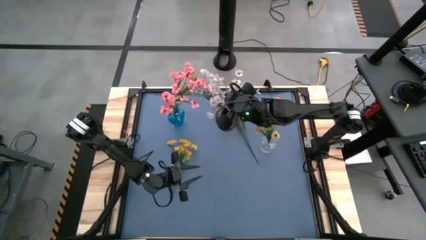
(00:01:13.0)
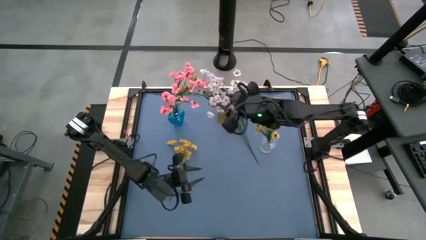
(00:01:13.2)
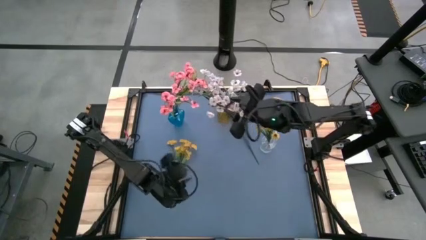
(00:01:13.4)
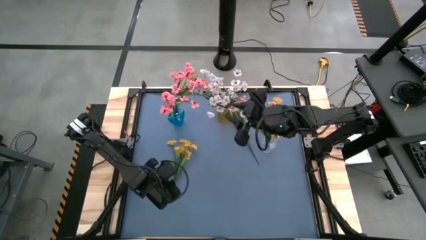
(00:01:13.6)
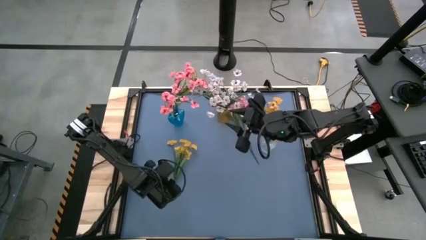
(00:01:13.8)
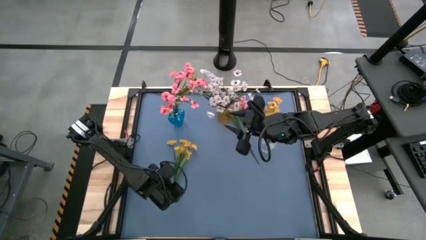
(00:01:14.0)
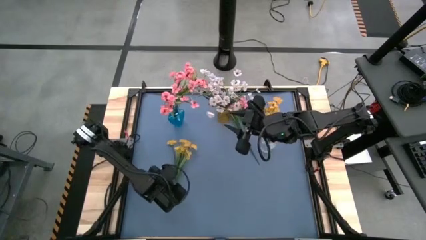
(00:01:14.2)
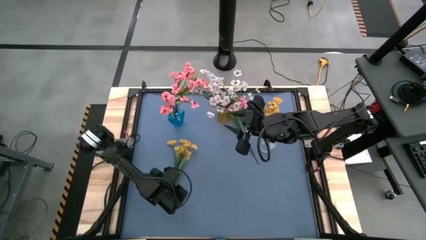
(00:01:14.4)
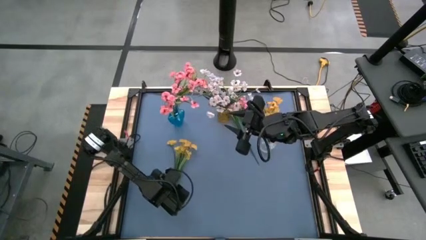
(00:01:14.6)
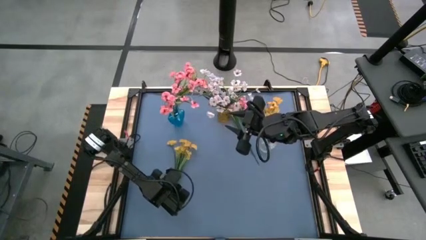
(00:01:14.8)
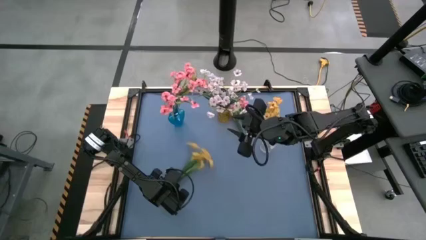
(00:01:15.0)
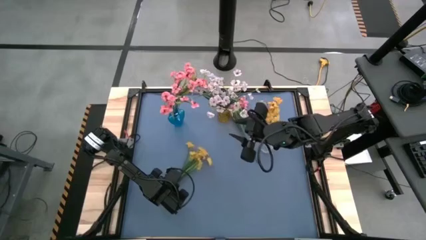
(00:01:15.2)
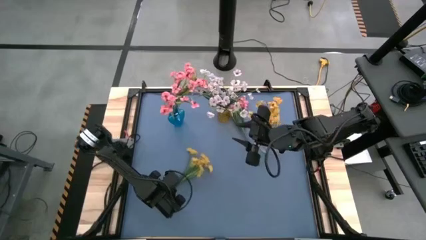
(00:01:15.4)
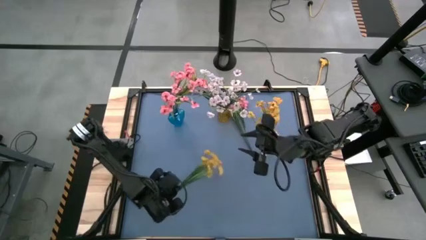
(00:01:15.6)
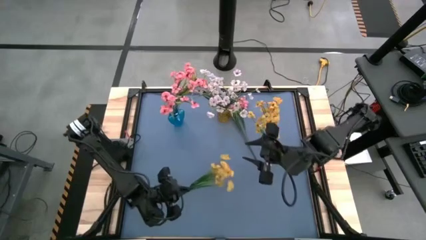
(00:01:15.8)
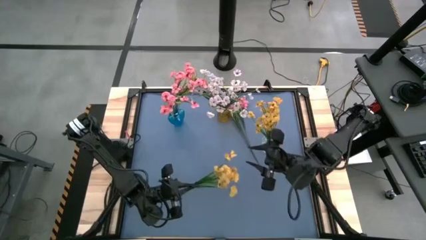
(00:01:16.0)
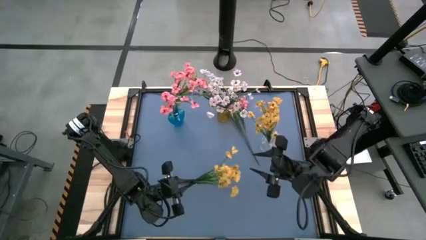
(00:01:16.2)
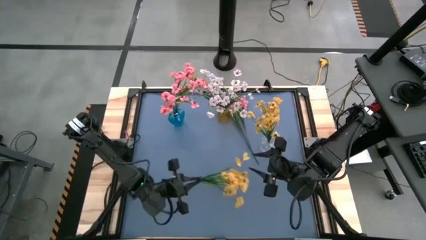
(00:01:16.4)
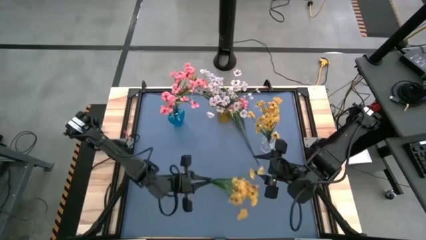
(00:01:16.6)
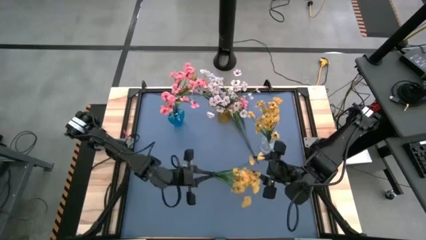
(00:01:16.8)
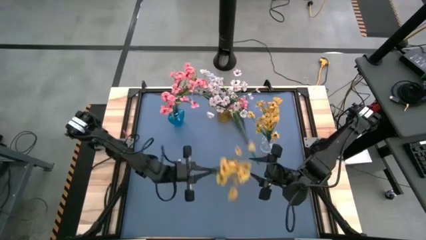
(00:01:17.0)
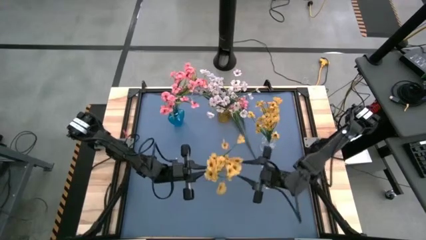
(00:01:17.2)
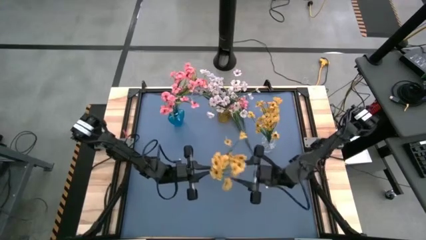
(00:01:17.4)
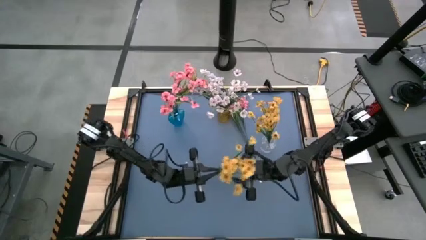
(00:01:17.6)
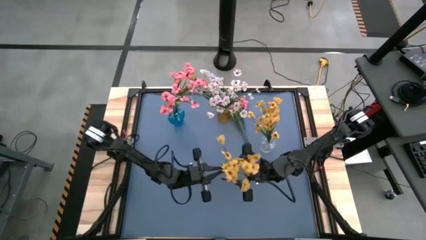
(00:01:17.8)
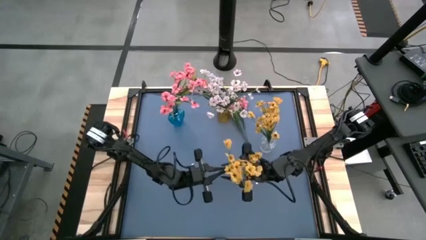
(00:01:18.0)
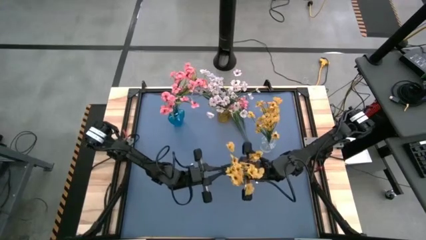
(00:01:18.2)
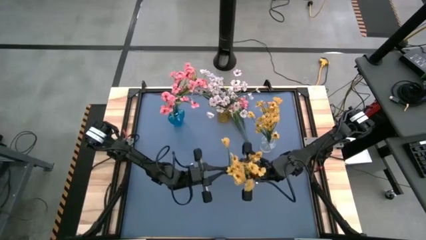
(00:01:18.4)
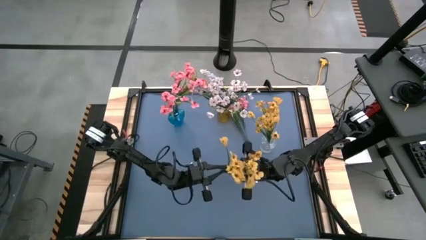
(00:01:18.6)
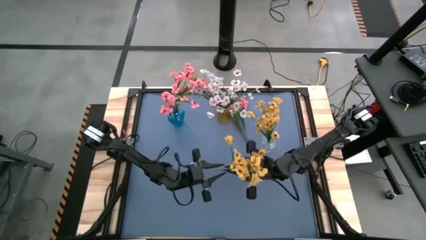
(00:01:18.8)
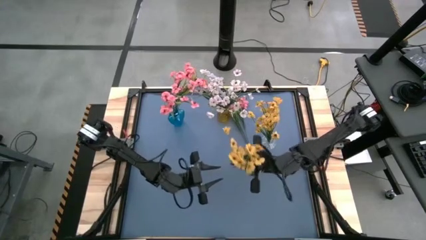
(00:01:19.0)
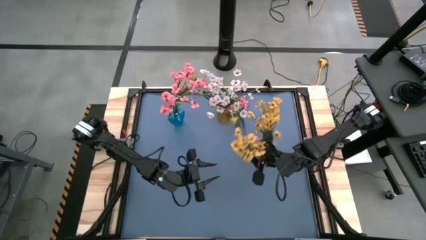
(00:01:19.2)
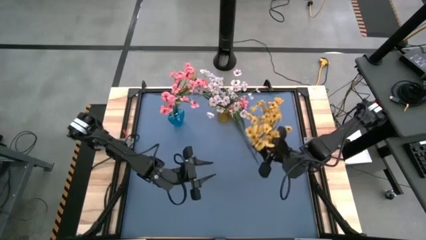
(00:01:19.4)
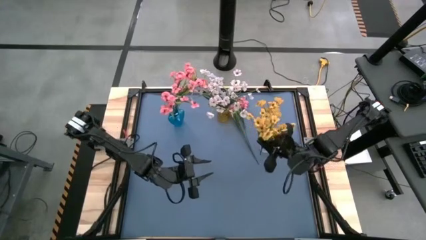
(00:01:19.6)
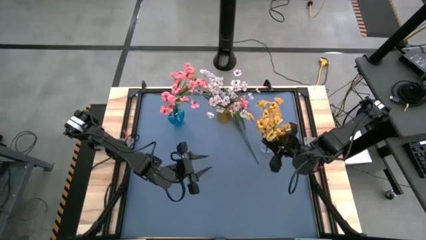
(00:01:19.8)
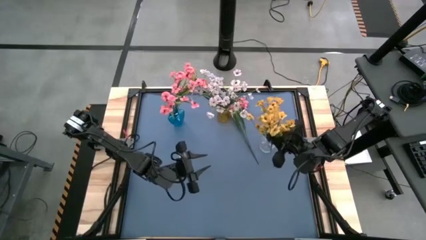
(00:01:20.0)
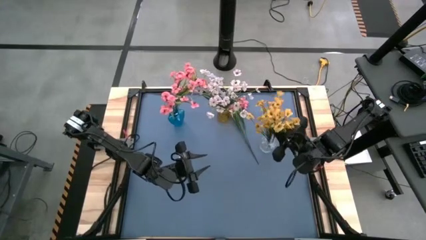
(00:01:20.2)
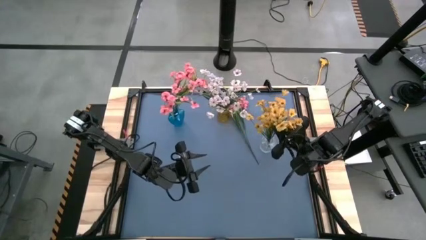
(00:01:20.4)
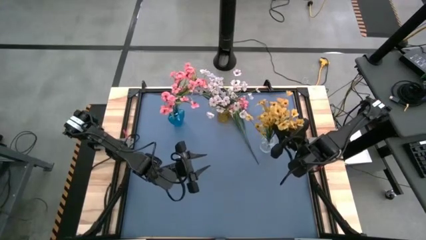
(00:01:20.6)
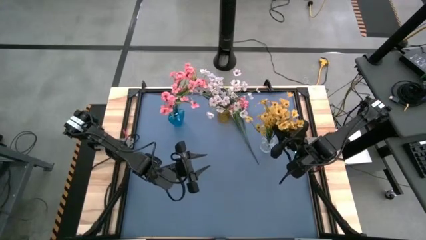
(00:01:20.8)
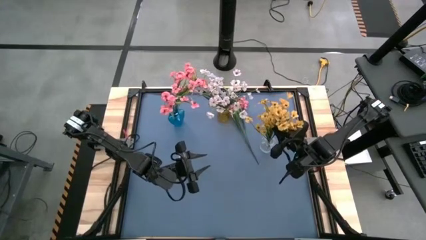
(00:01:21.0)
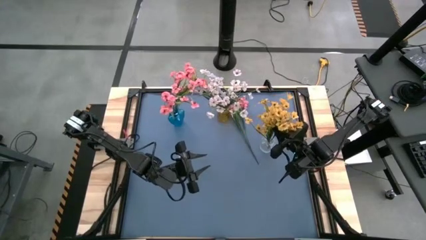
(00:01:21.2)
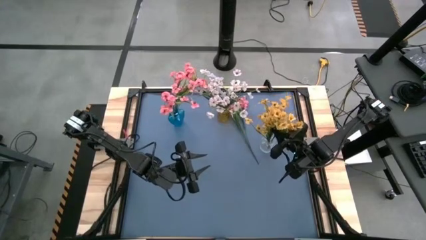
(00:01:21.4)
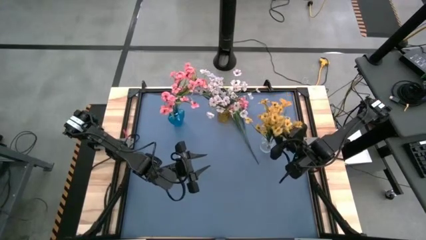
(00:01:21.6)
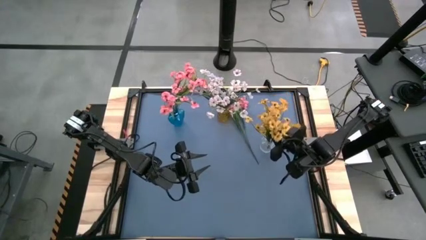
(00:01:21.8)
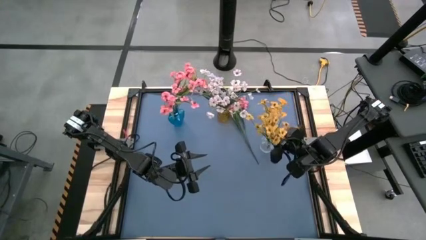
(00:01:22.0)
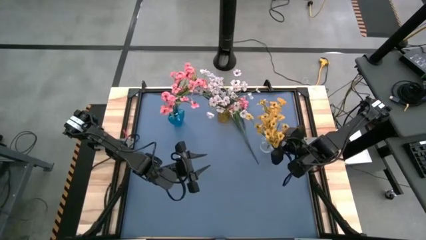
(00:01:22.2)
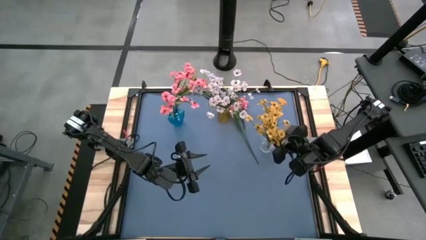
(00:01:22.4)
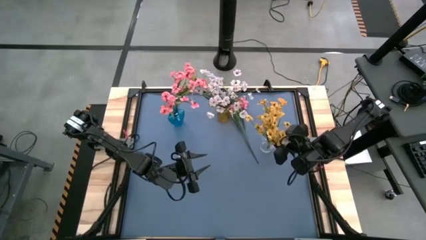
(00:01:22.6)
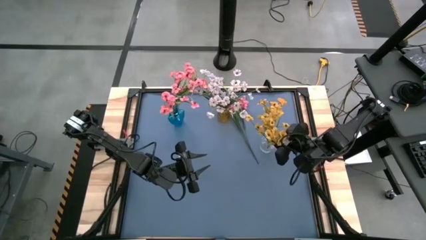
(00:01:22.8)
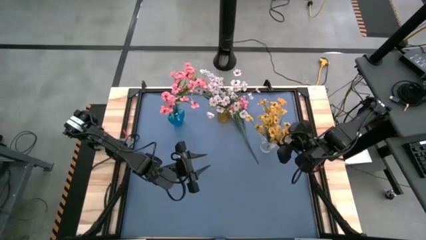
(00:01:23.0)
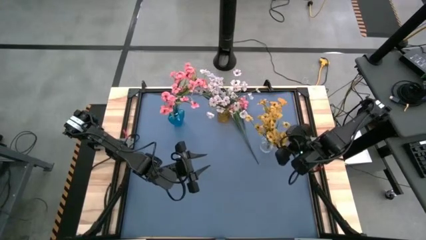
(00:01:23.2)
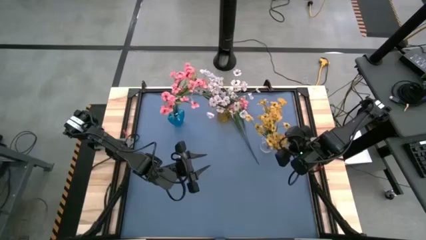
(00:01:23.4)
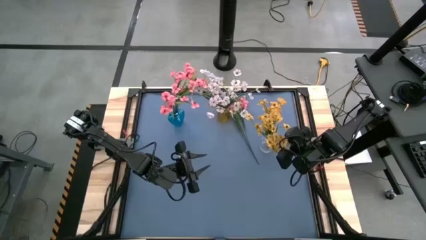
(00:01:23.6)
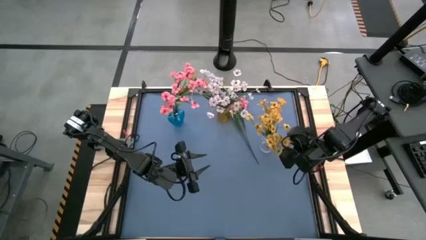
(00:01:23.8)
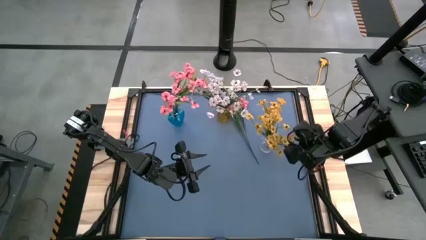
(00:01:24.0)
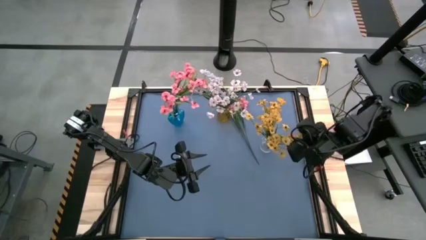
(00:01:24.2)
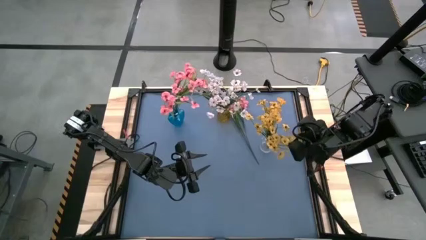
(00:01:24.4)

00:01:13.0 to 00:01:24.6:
Task: Sort flowers into vase by color
Put the yellow flowers into the transparent vase

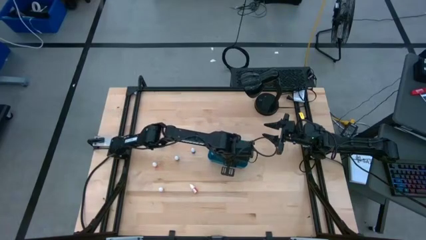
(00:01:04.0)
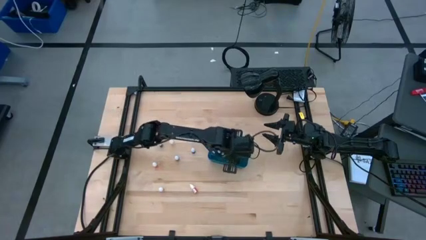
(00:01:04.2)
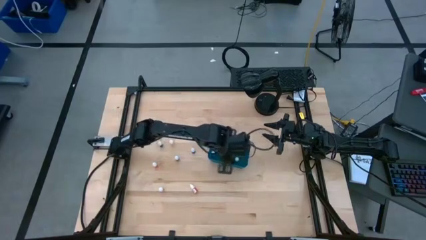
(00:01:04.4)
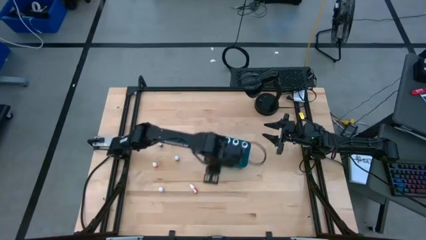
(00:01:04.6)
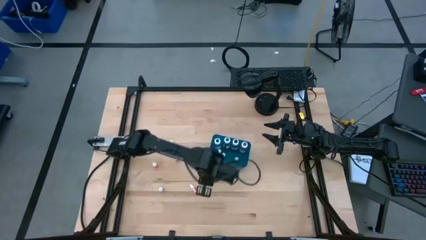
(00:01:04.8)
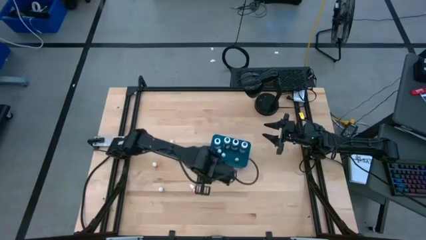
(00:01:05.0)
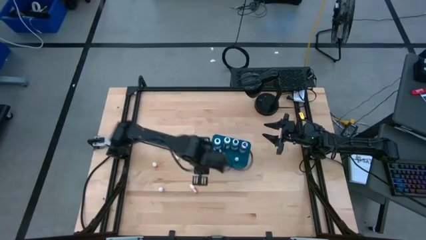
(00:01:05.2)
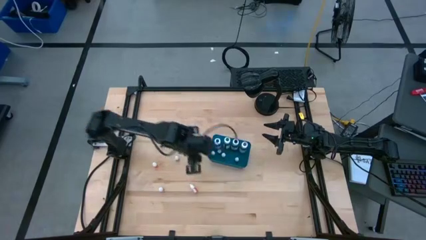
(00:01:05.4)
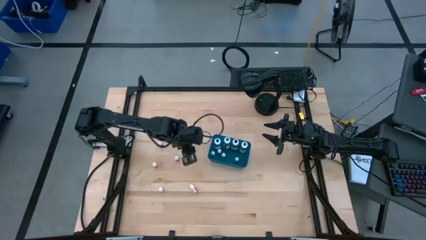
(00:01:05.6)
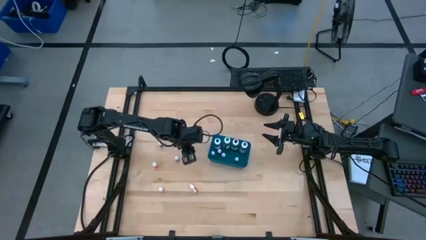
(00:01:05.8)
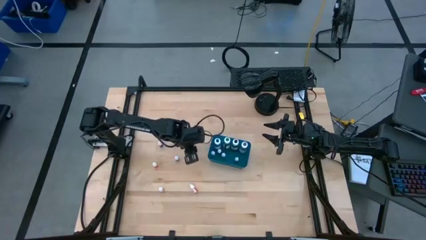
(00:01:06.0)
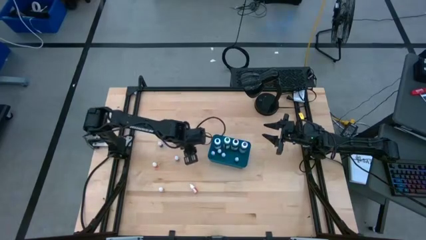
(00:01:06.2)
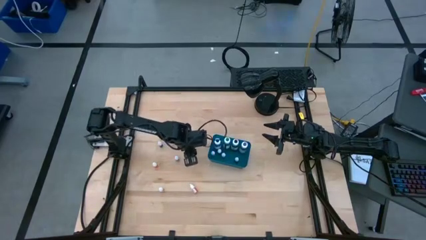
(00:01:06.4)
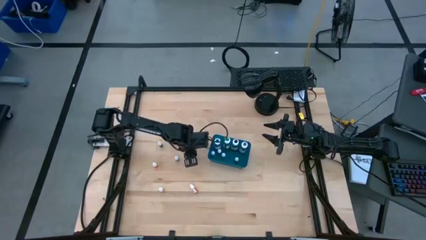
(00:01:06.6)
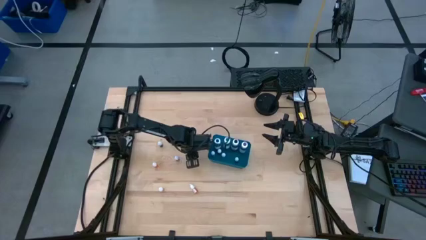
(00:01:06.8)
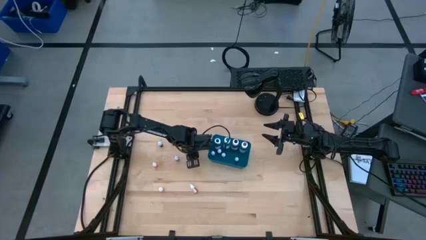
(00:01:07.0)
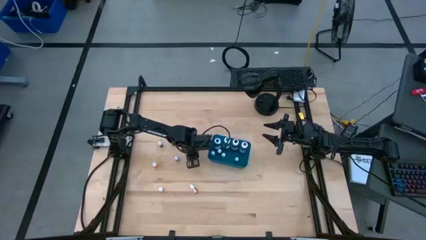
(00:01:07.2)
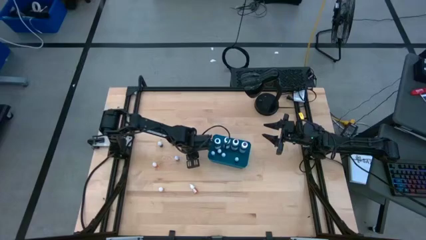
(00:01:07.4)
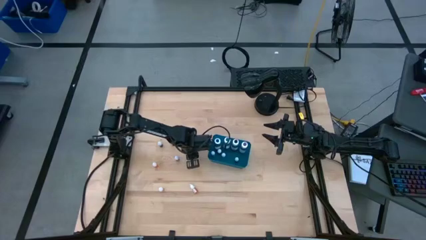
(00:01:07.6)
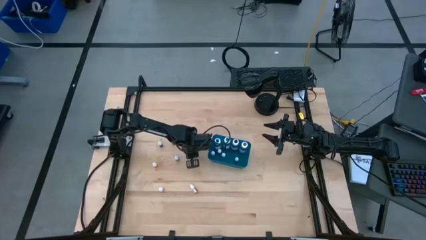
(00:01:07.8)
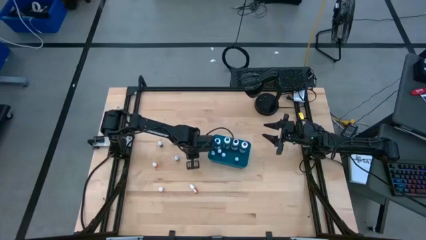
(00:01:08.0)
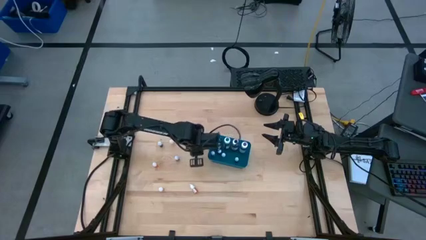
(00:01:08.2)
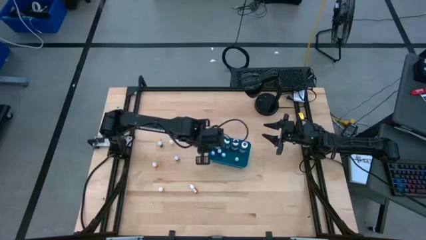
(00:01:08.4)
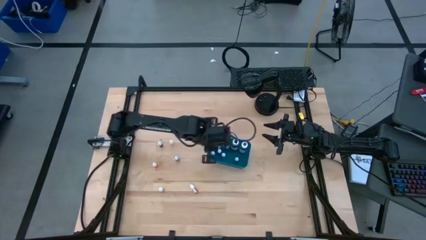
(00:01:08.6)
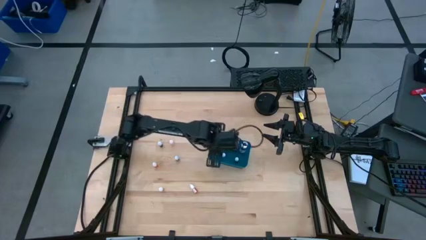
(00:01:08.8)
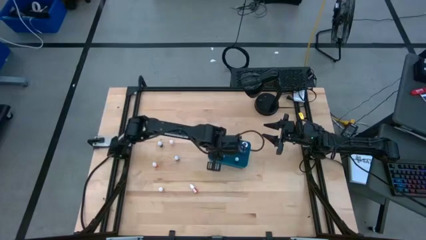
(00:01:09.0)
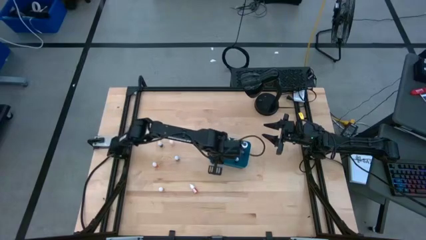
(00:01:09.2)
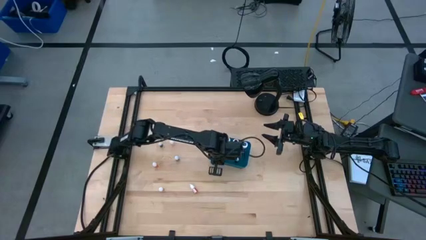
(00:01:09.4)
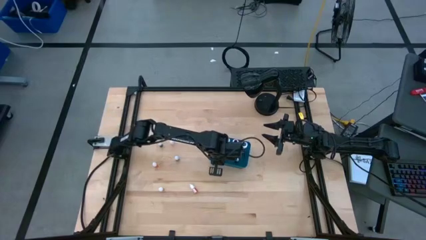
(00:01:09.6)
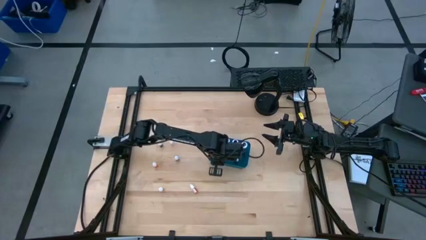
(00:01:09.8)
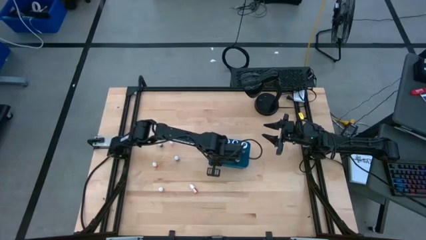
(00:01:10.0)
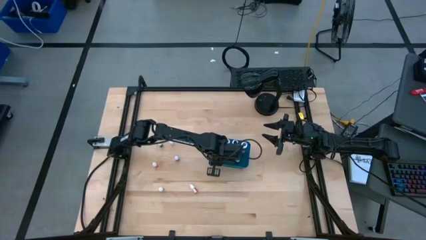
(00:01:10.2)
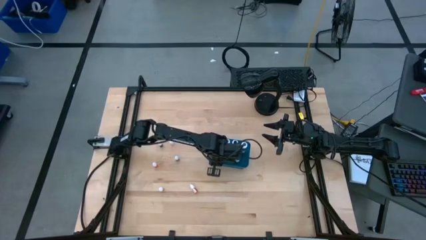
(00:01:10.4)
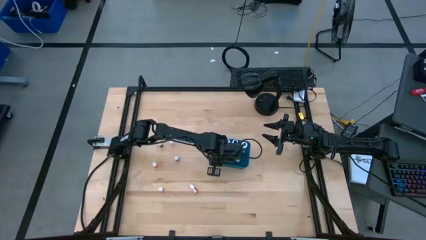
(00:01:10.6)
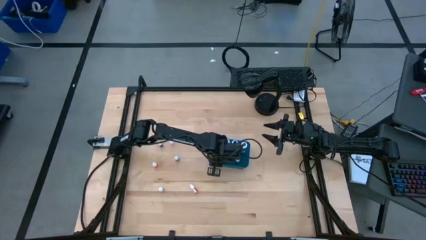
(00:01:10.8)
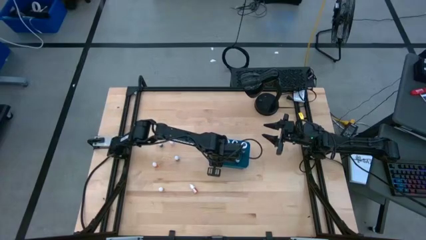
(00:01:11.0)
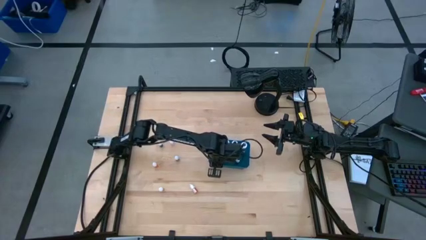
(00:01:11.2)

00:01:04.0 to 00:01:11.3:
Task: Pick & Place food coloring
Put the small purple food coloring bottle into the blue container
